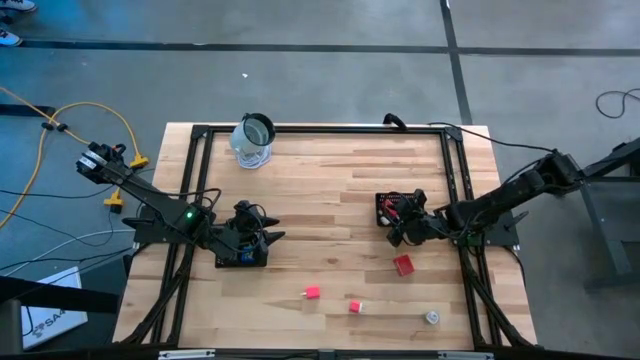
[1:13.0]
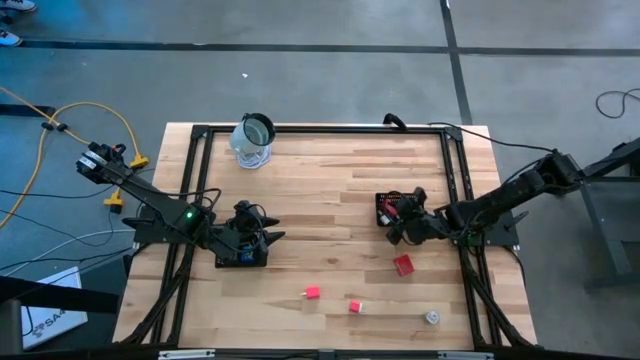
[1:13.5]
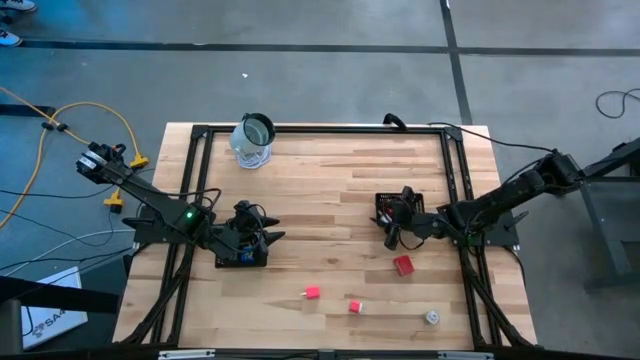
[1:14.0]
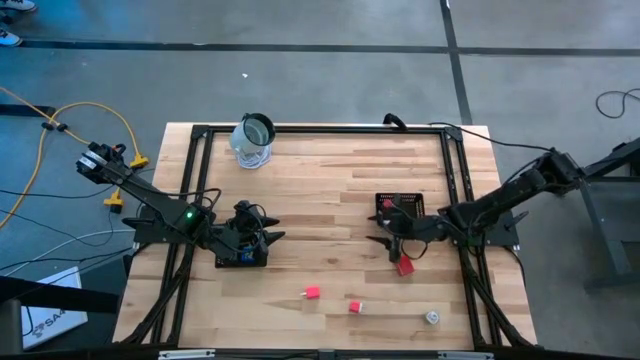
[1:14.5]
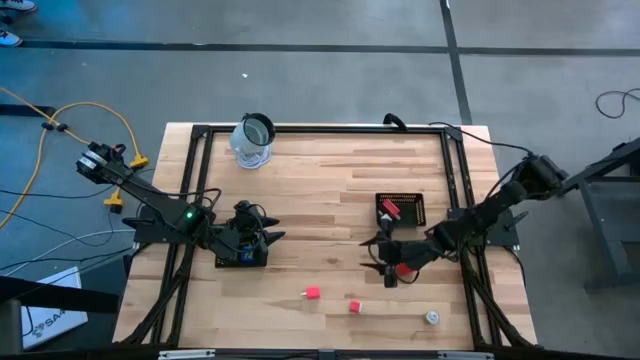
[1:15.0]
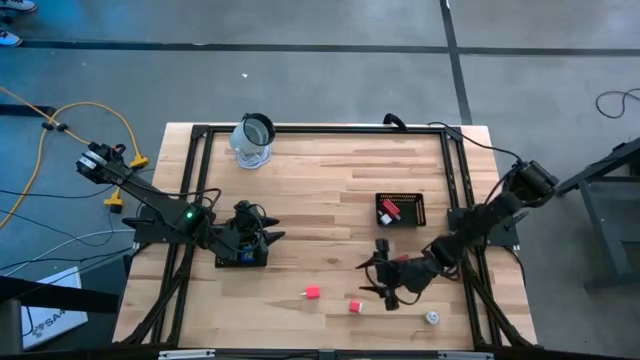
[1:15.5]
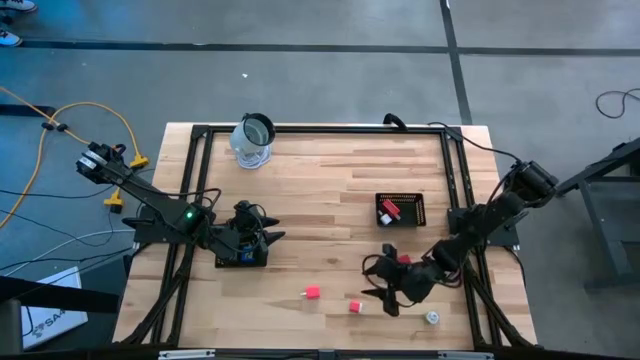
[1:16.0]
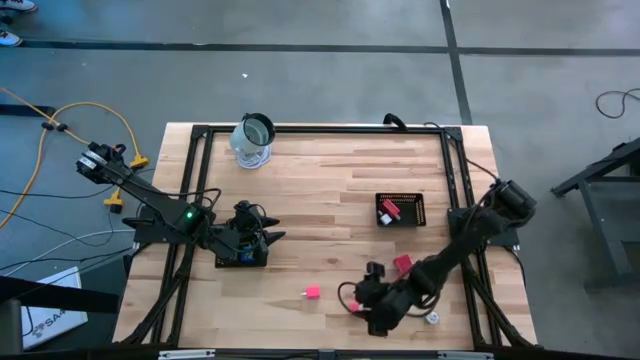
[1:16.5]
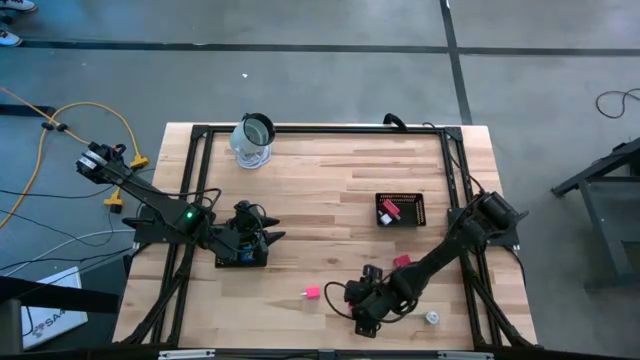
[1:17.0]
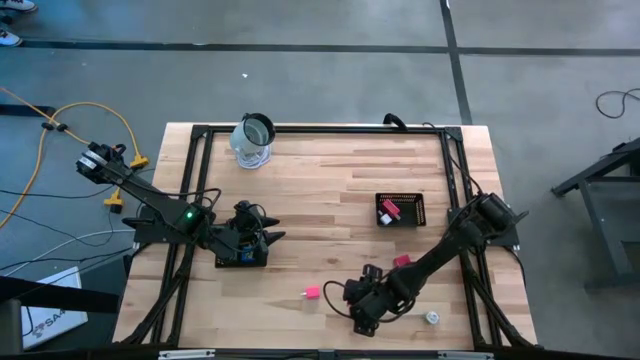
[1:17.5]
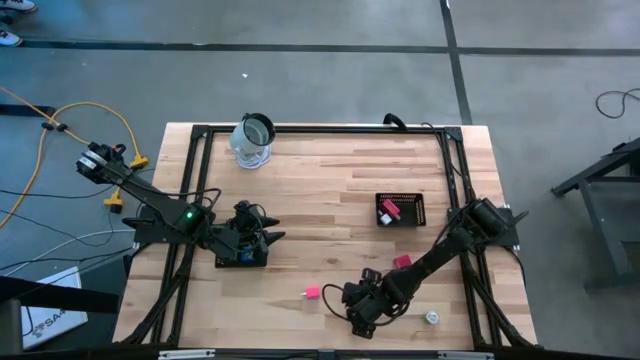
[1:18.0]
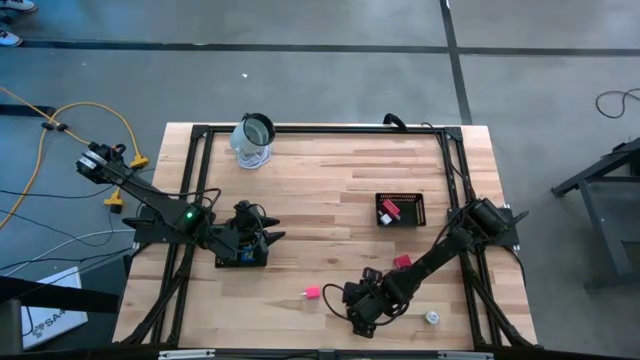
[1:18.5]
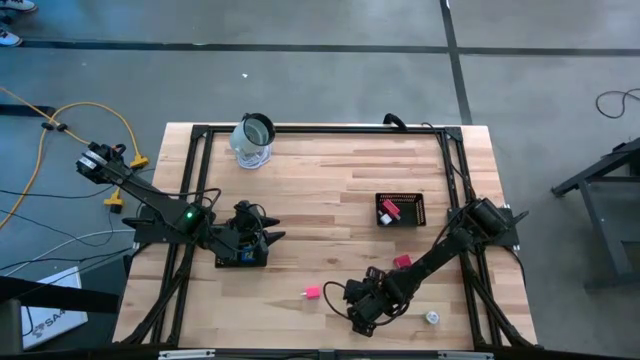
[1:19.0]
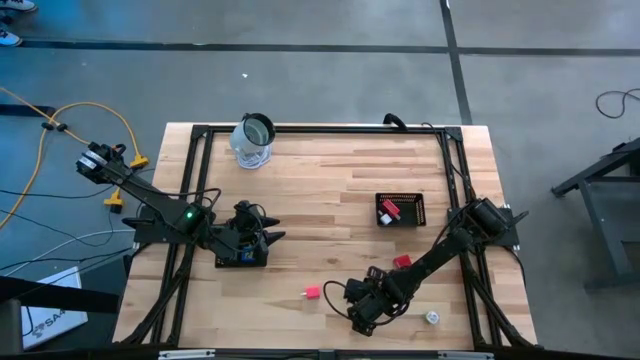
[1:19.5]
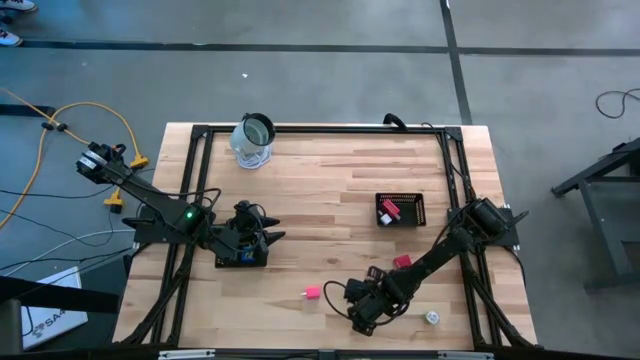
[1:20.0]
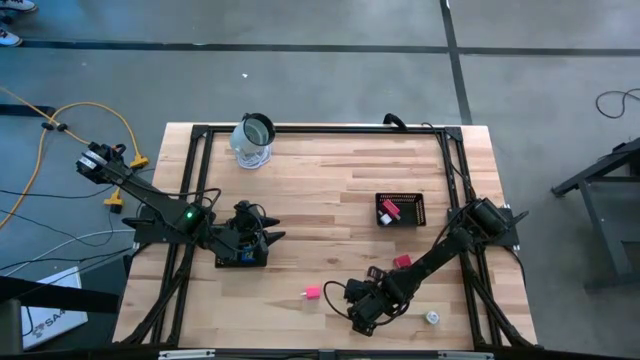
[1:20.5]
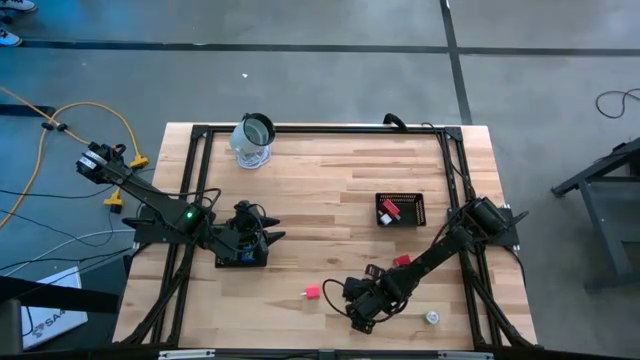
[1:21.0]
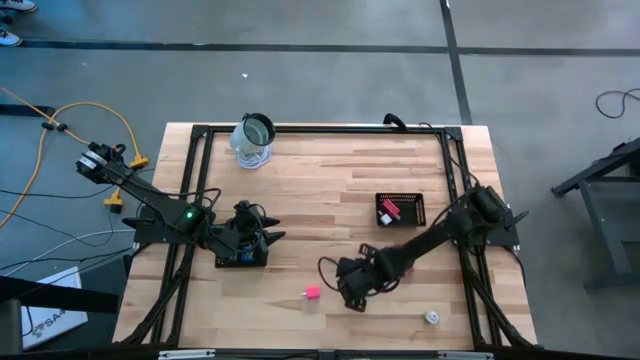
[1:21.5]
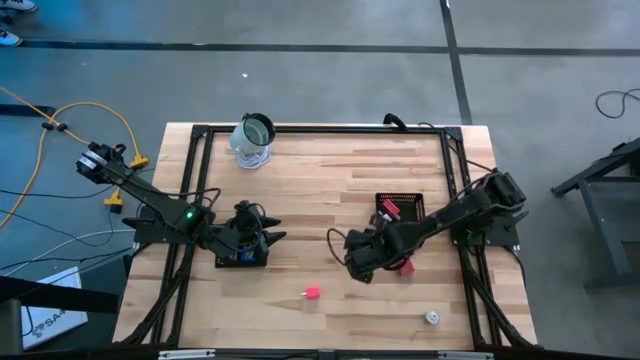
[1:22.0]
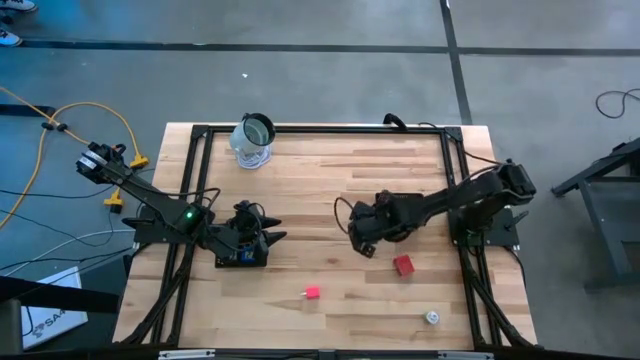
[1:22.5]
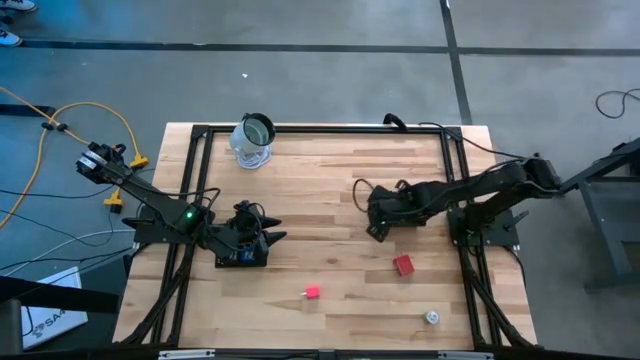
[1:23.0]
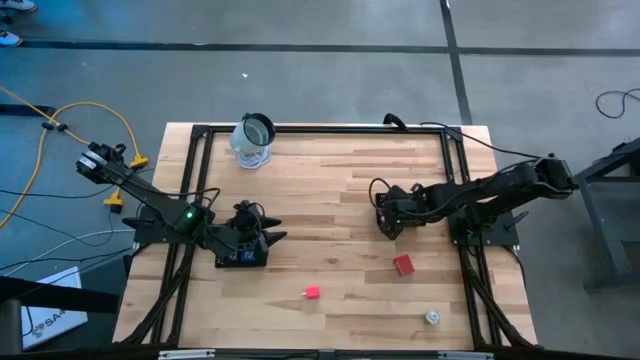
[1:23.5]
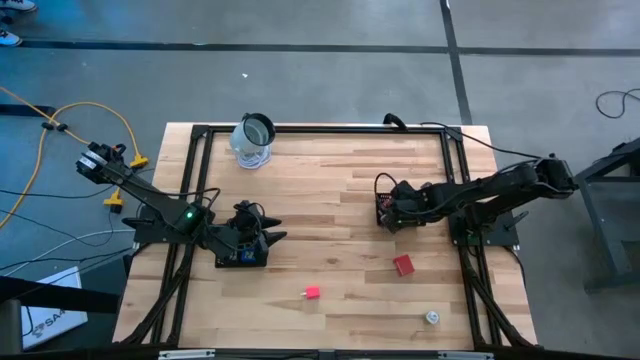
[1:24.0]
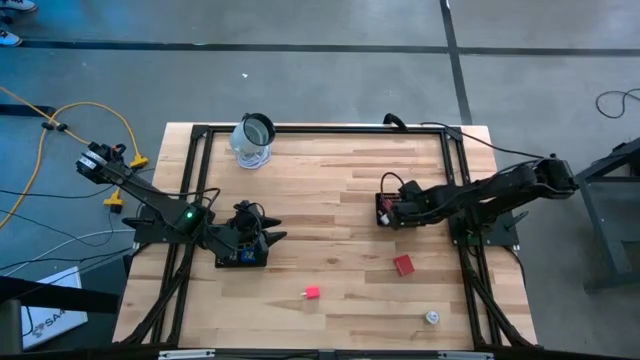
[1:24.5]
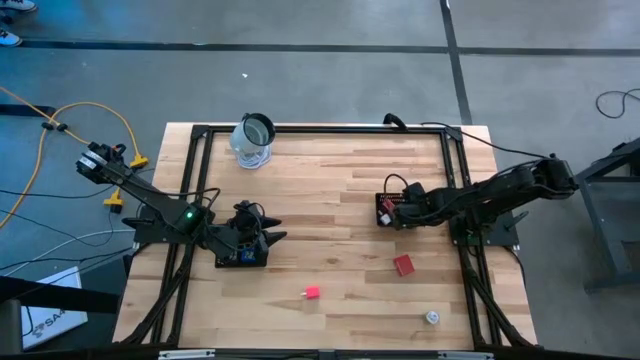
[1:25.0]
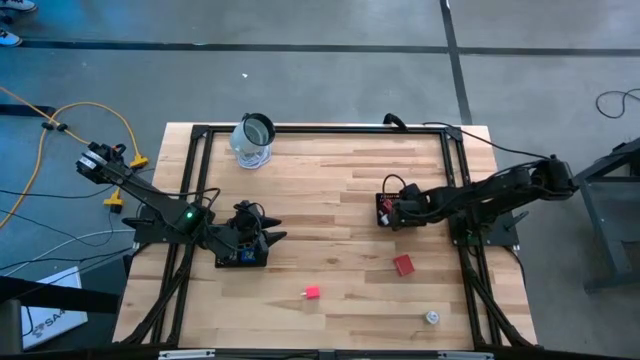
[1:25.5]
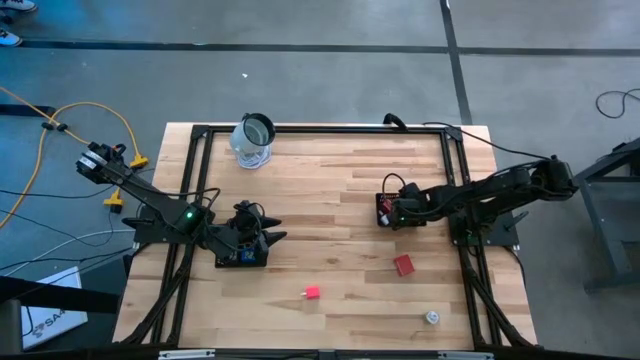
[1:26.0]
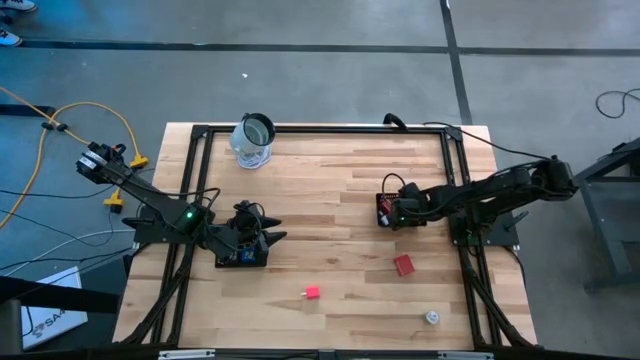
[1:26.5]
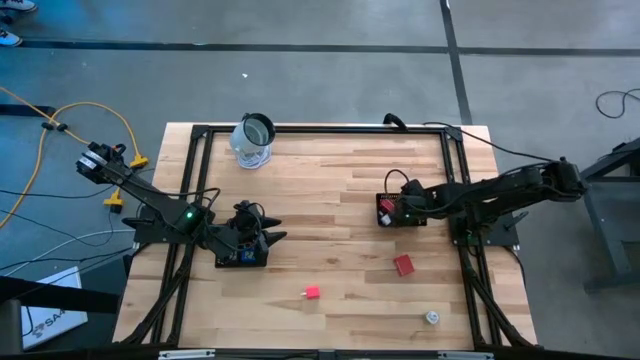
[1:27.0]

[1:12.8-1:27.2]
Task: Pick & Place Office items
Put the pink white charger adapter into the right black bin

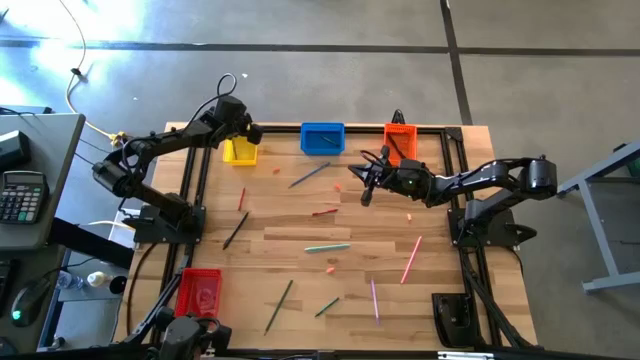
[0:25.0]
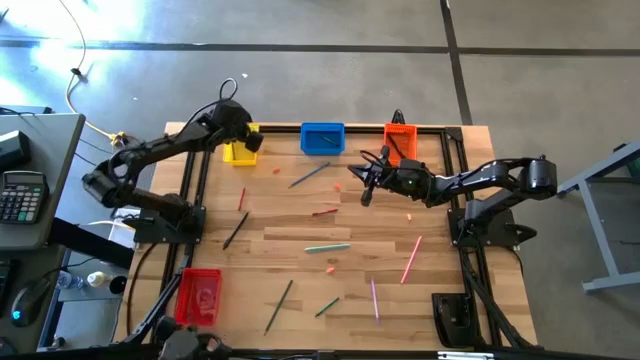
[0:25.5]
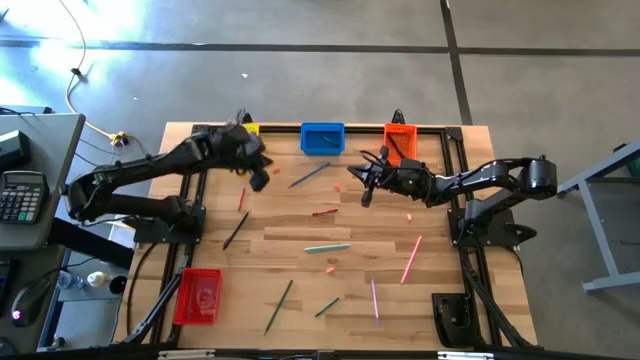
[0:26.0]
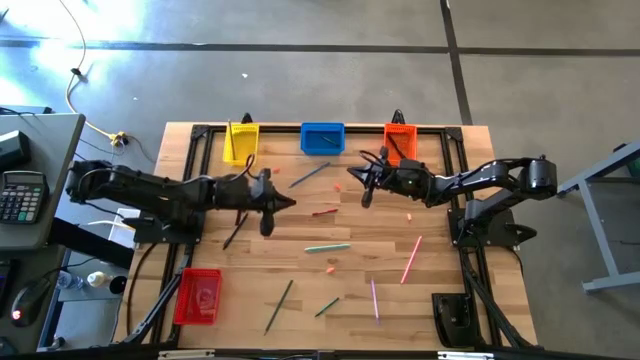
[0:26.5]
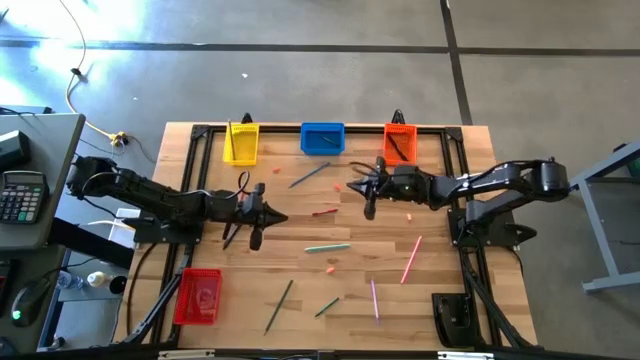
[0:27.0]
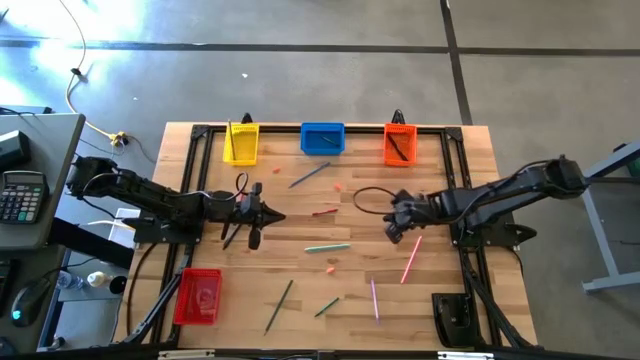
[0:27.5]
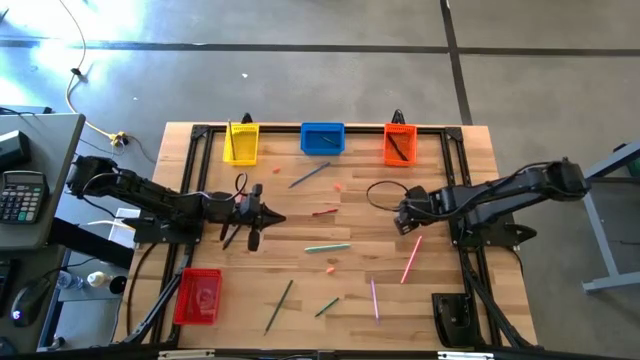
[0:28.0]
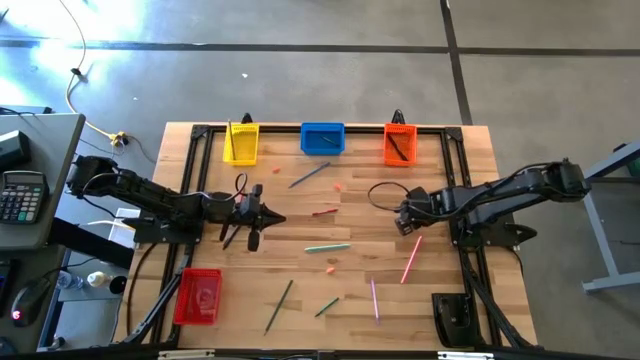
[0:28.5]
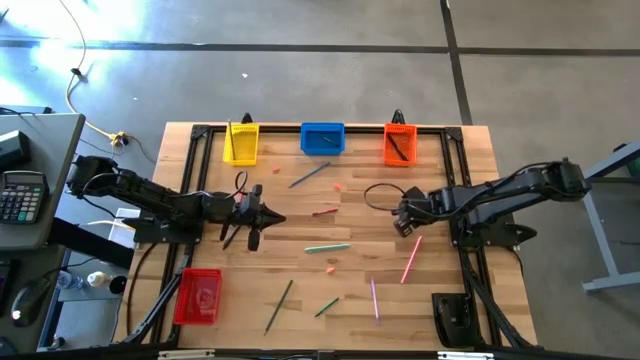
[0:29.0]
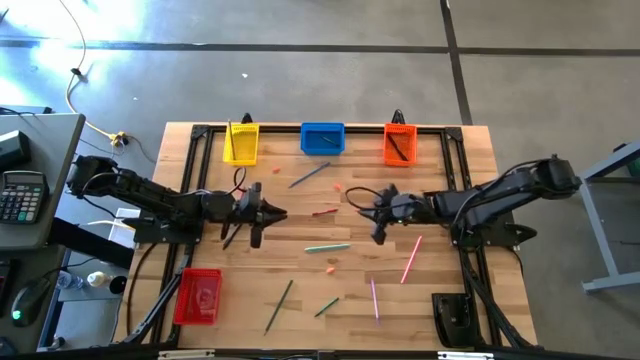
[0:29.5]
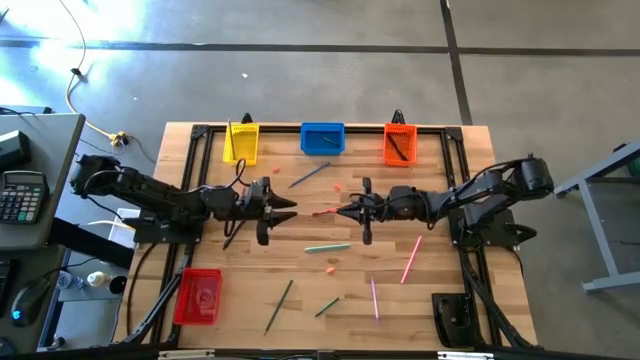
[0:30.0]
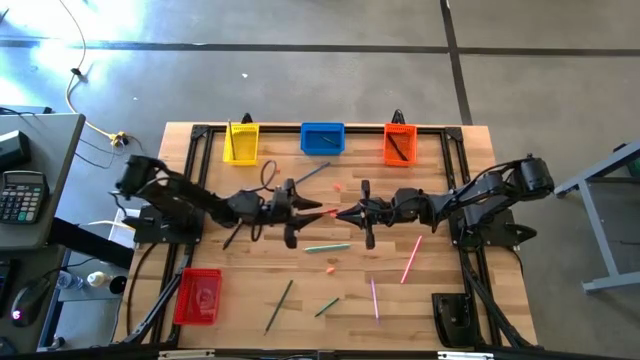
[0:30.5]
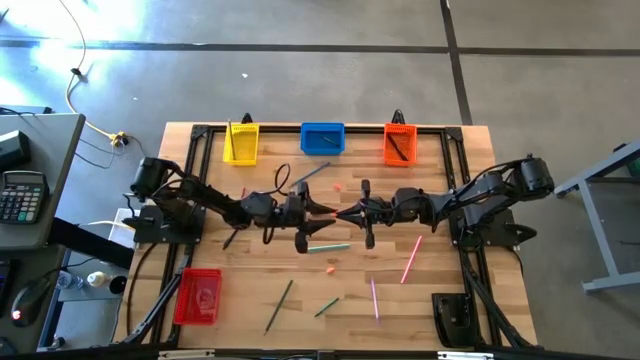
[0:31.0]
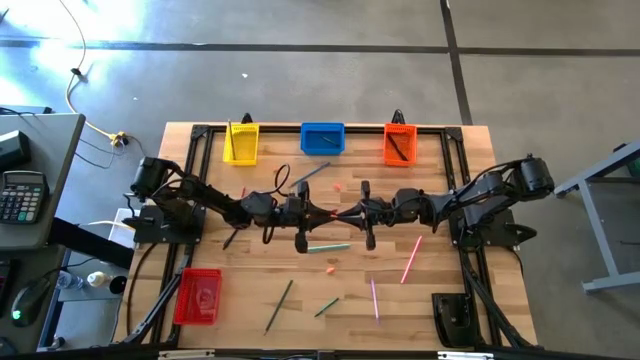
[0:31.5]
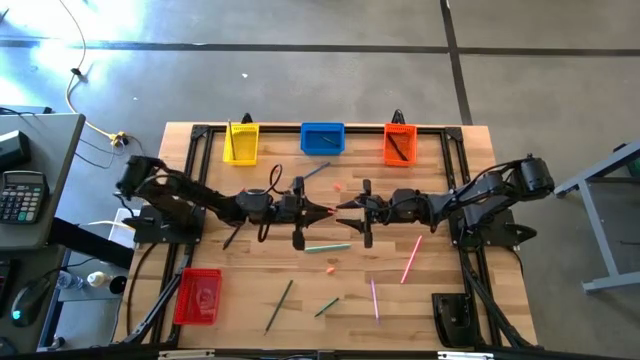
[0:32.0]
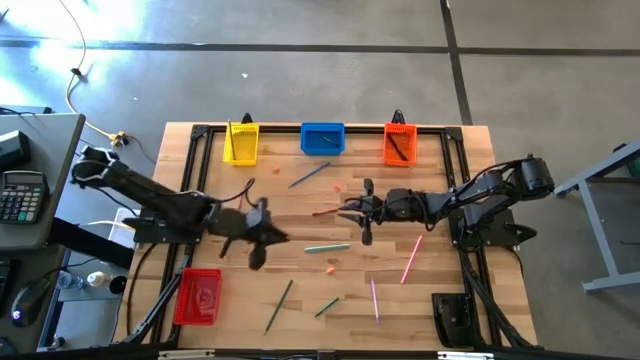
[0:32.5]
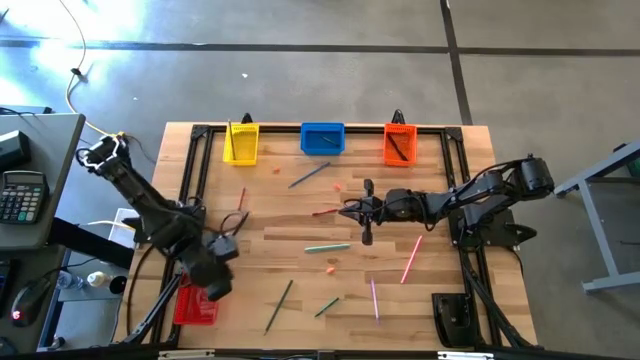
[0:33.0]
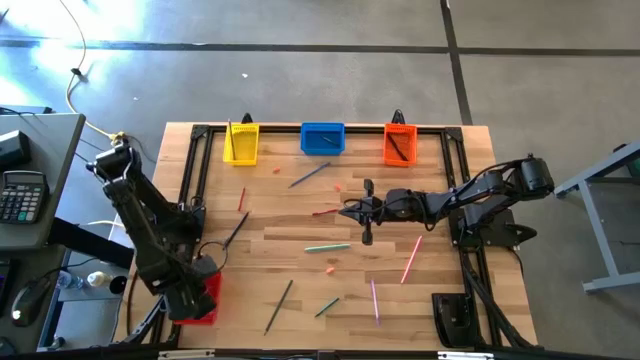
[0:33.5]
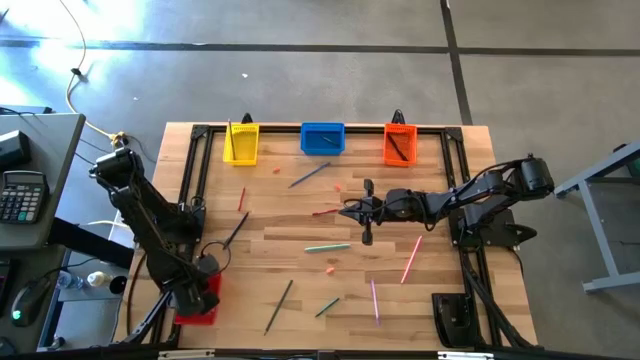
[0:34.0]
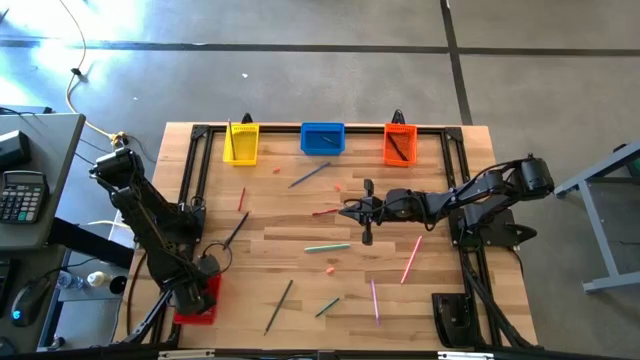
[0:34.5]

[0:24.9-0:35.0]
Task: Sort crayons/erasers/pens/pencils in bins
Put the orange eraser into the red bin
